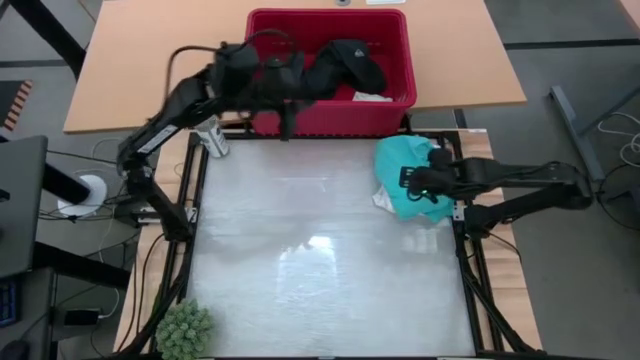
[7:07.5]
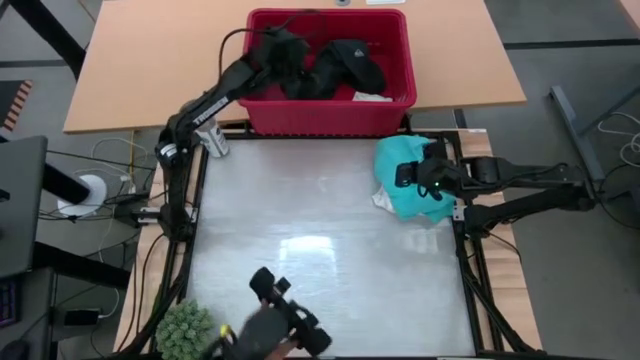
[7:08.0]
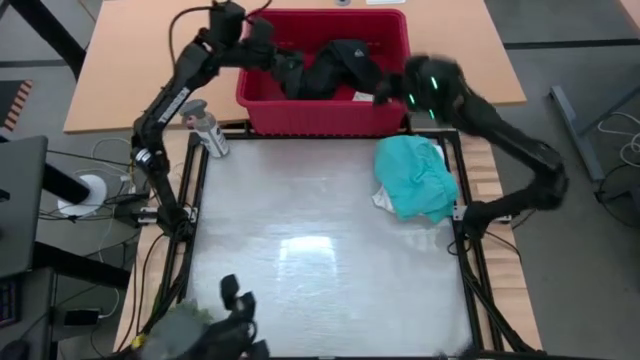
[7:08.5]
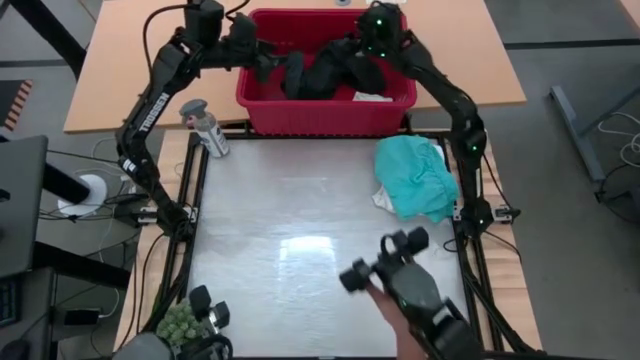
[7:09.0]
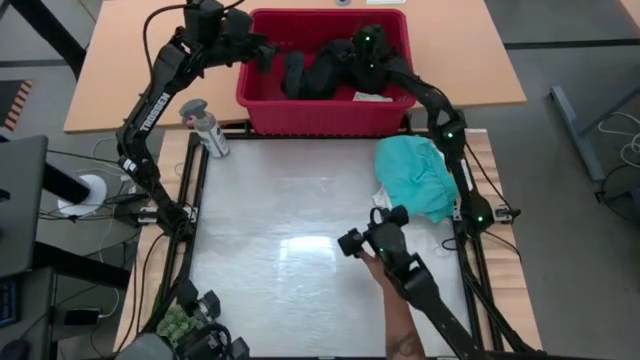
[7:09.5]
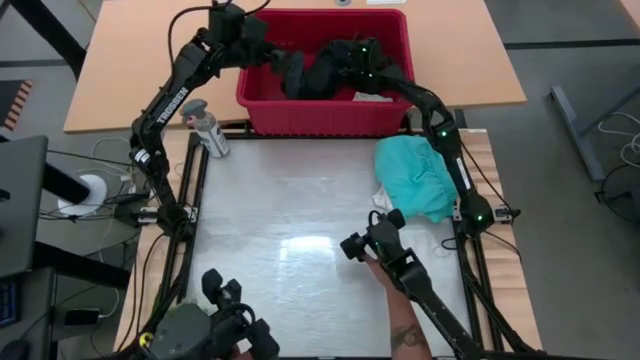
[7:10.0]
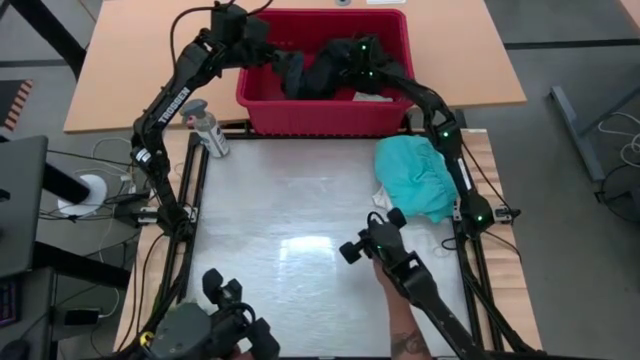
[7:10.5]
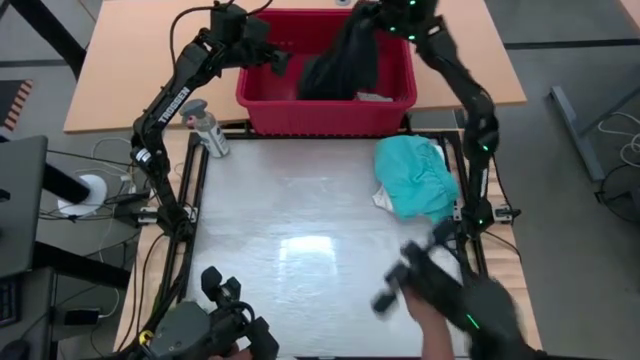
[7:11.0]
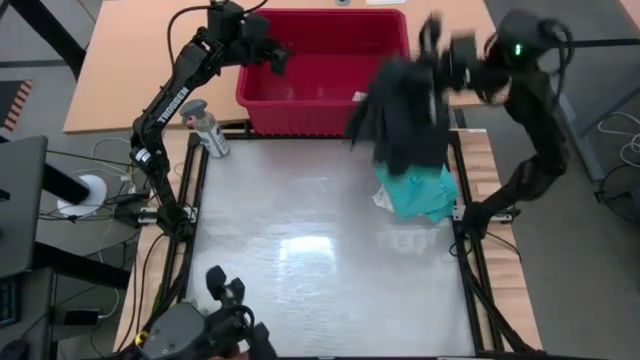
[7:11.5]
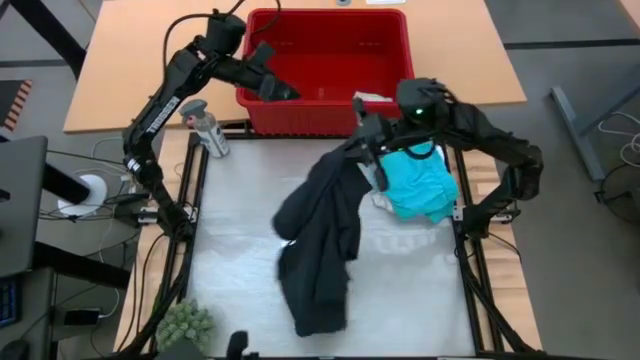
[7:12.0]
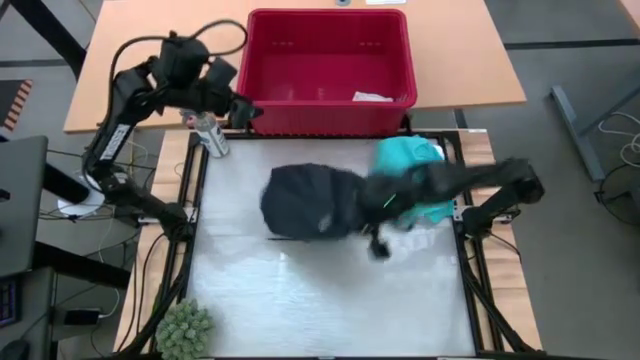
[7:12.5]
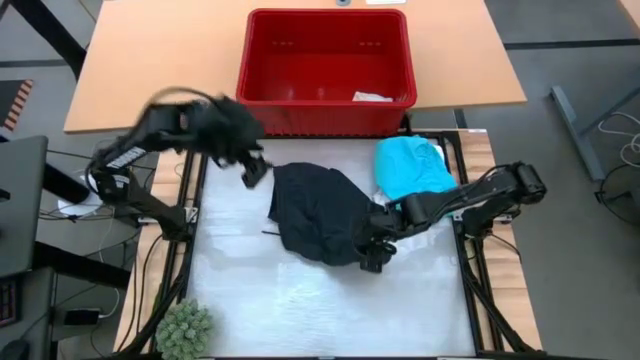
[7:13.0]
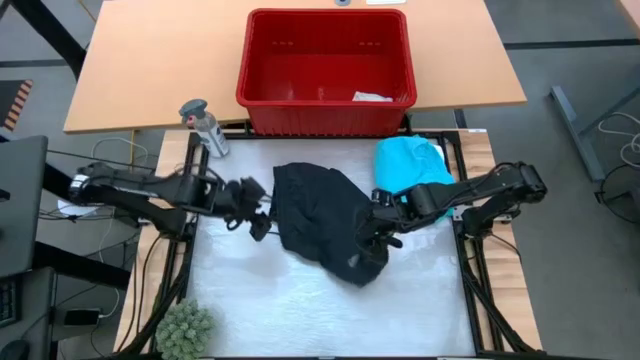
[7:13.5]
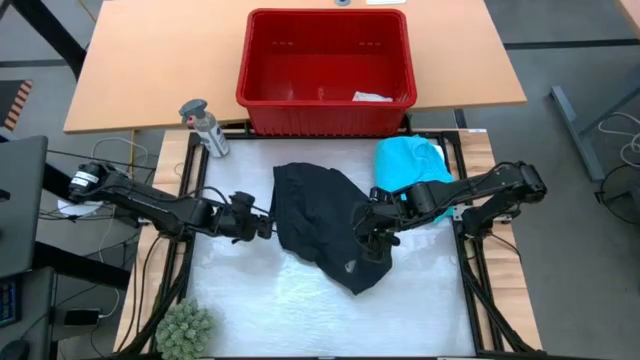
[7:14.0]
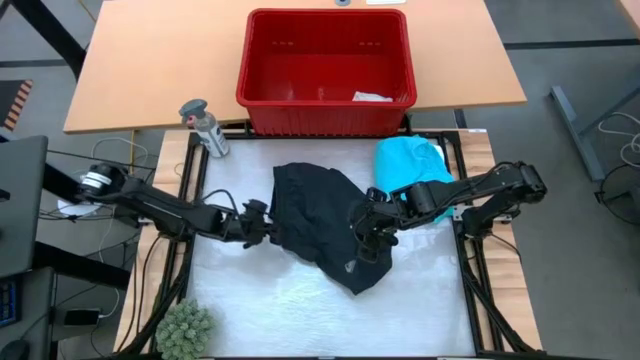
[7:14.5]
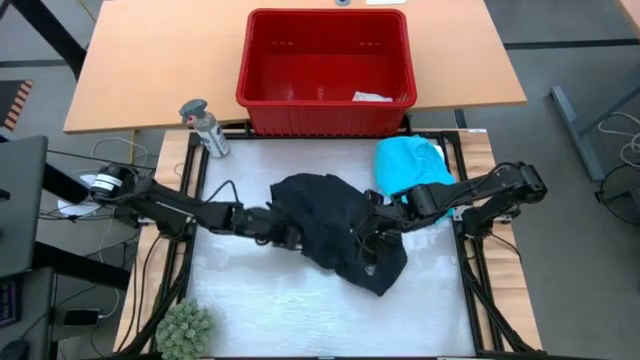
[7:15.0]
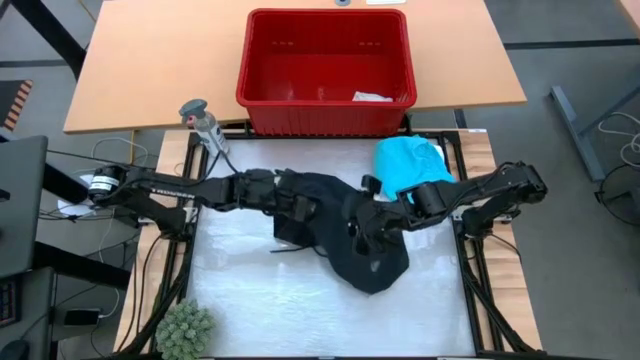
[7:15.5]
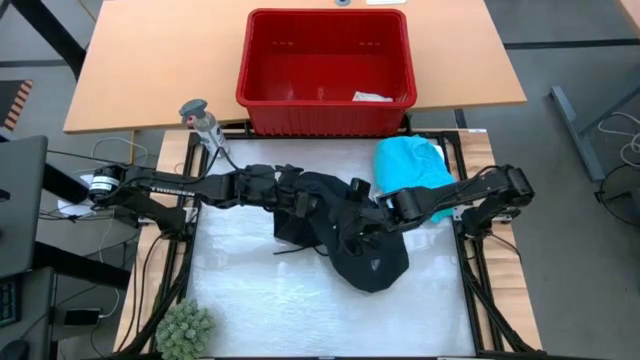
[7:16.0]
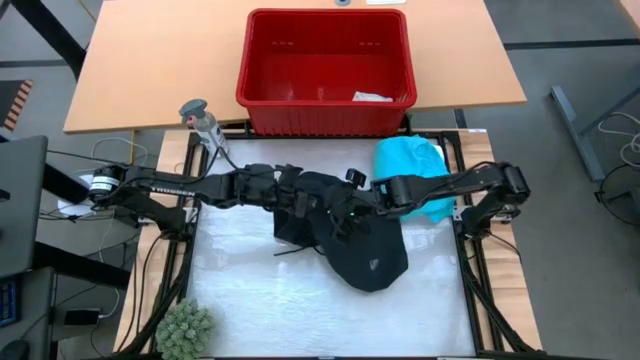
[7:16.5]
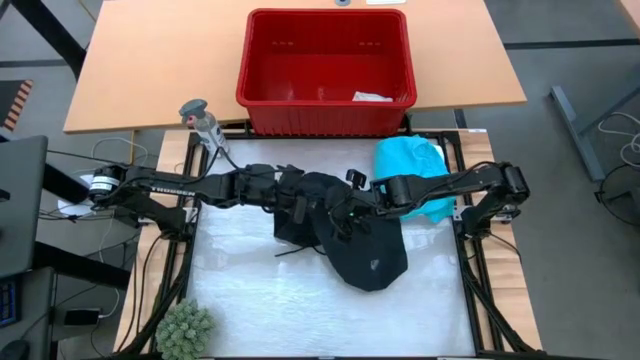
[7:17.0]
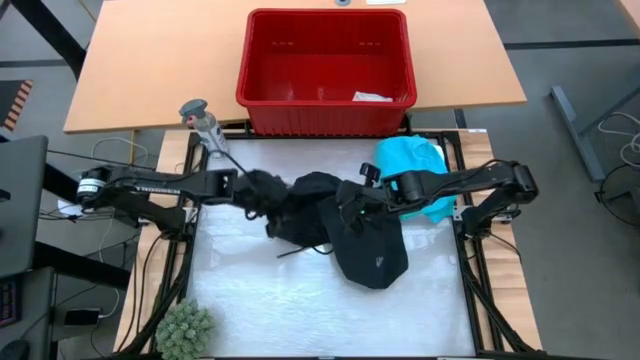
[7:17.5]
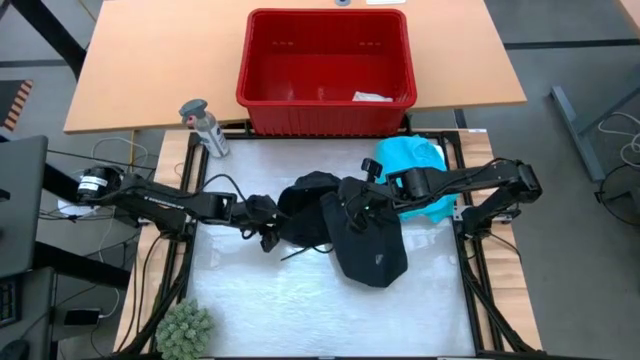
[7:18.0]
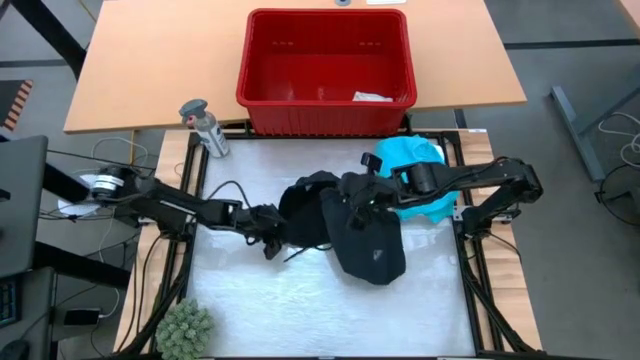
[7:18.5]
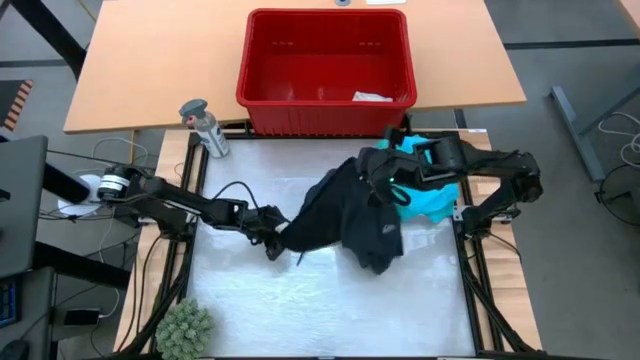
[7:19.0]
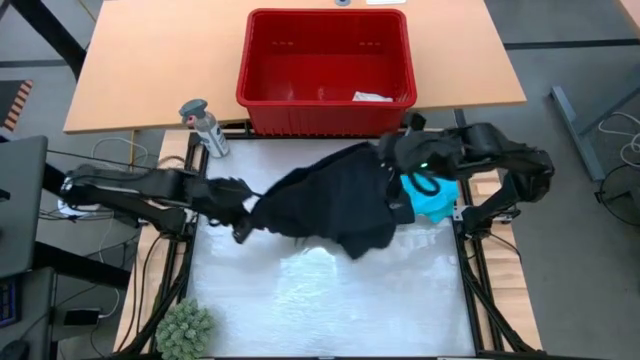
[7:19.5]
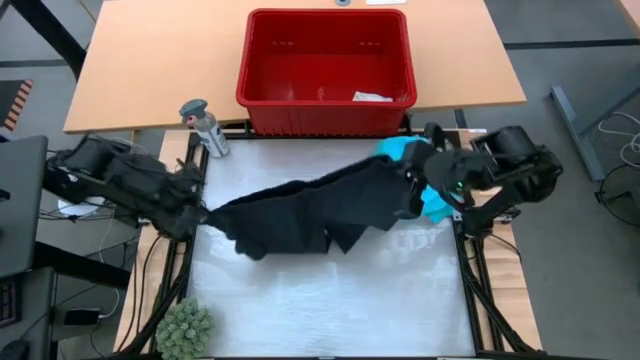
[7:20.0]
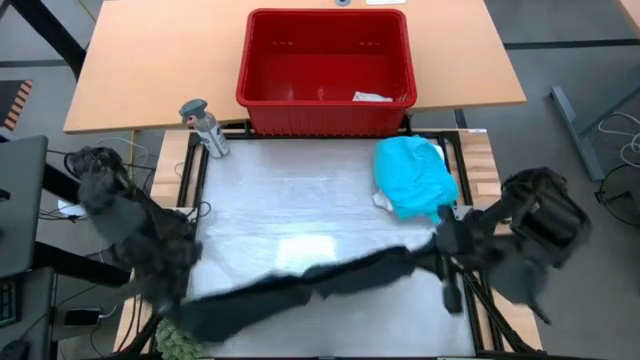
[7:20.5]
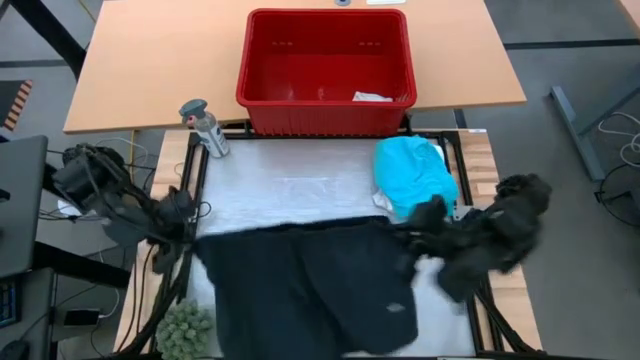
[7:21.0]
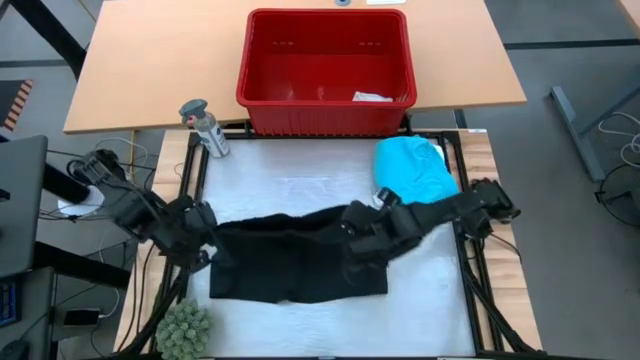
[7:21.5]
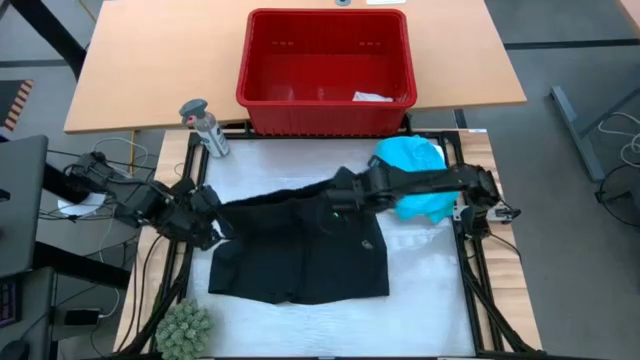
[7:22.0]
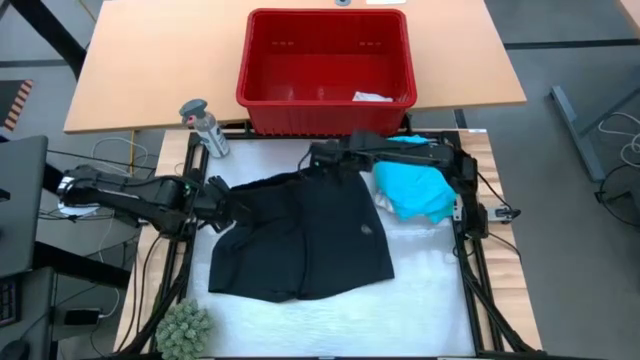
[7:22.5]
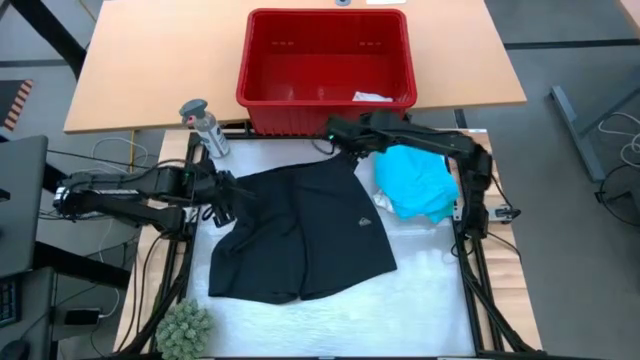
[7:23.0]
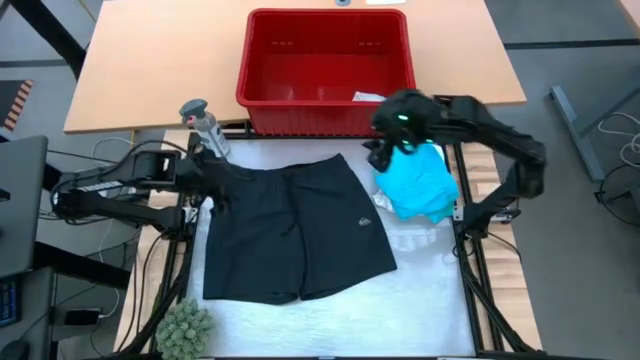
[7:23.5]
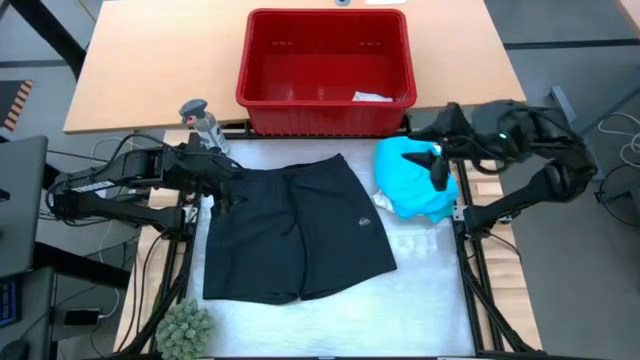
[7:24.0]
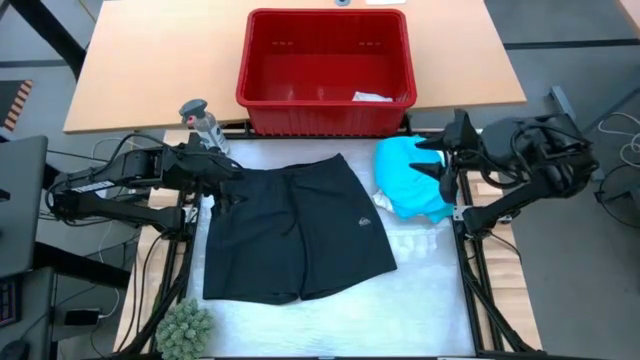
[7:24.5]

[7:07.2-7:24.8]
Task: Fold Laundry from Bin
Fold the black shorts
